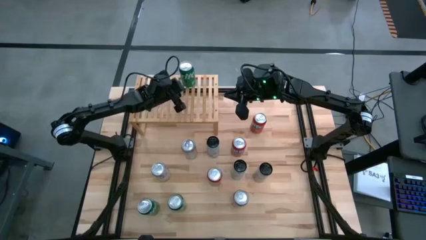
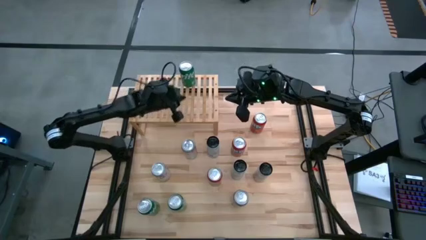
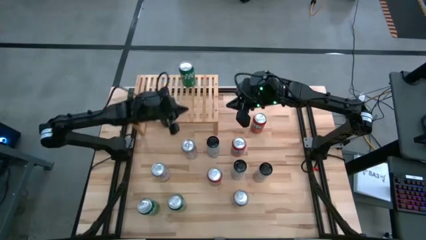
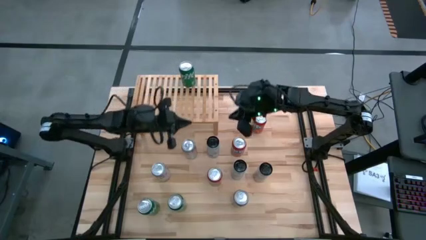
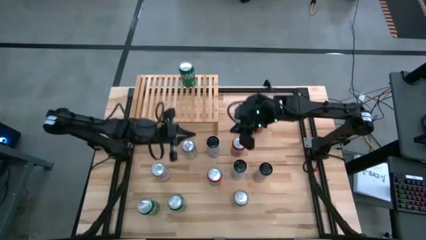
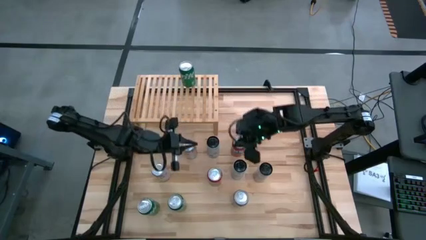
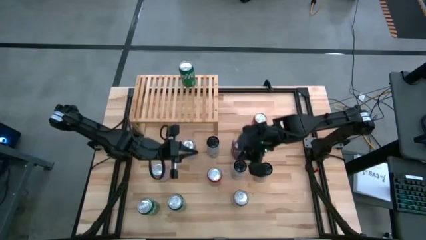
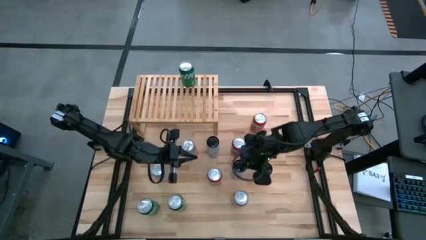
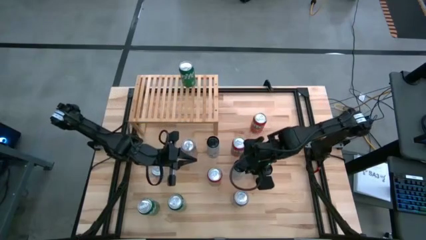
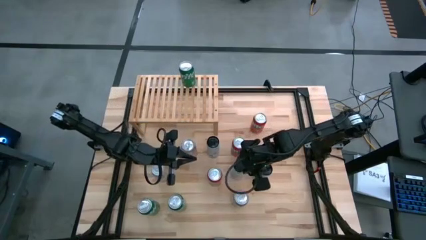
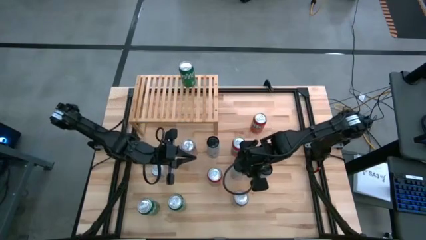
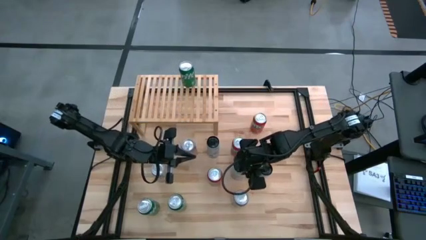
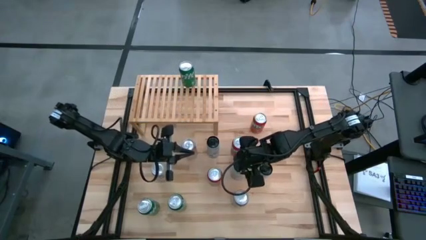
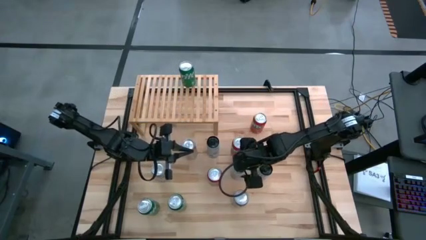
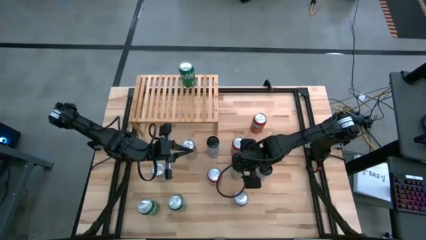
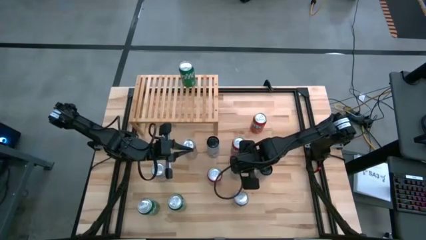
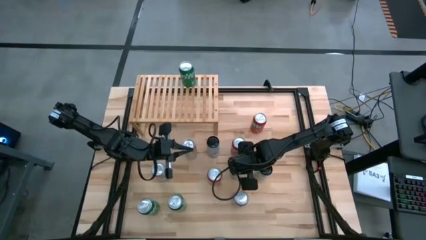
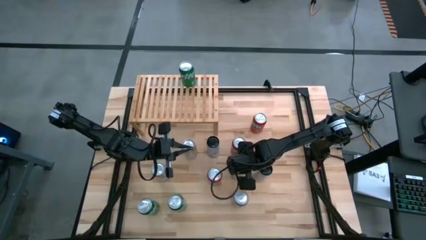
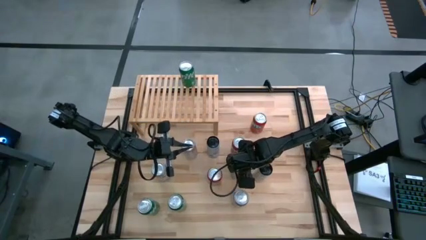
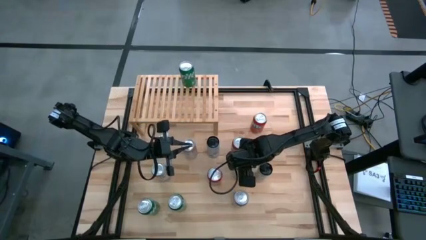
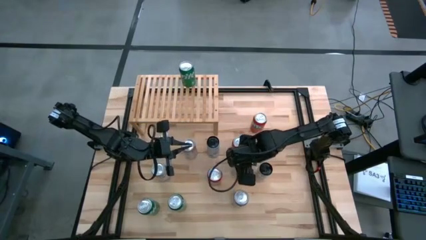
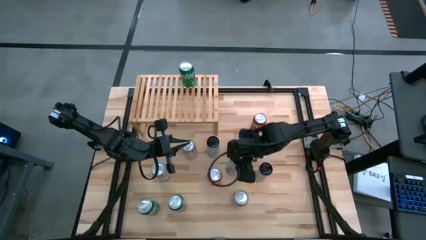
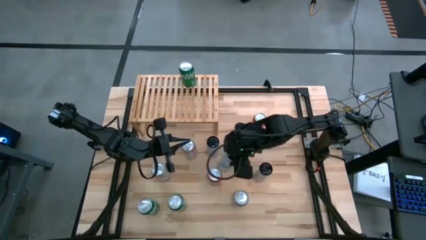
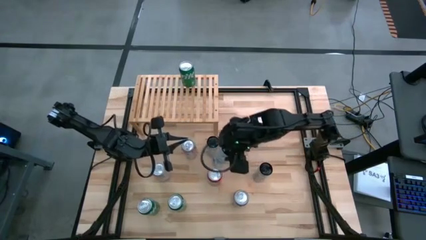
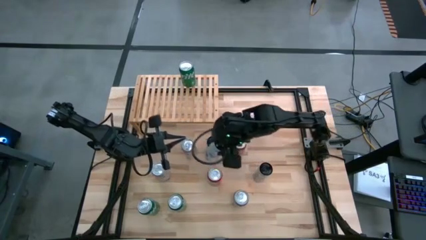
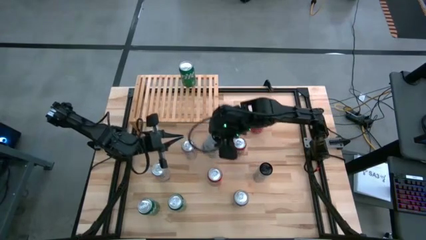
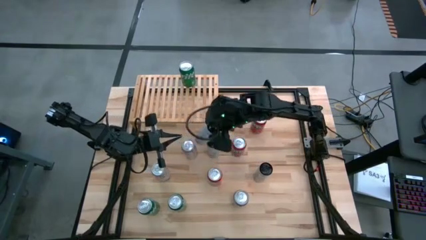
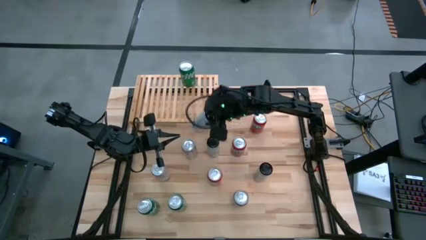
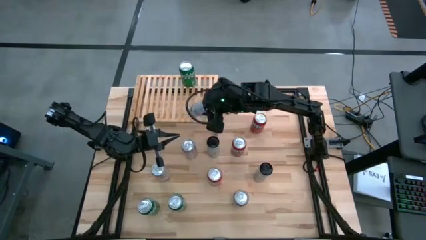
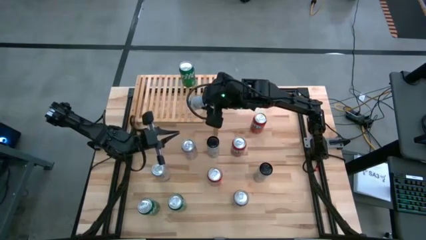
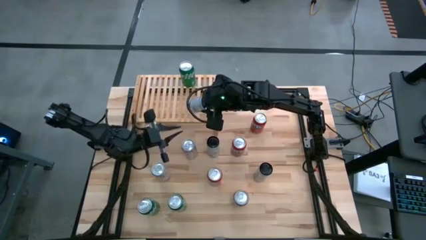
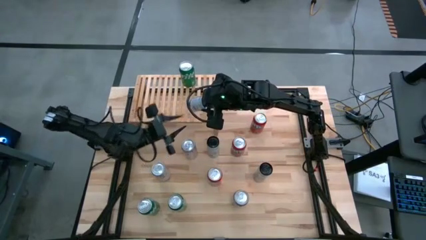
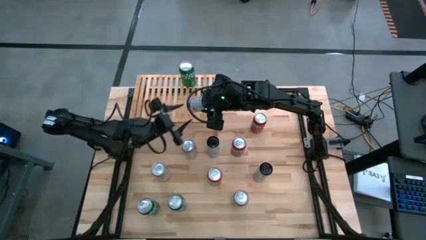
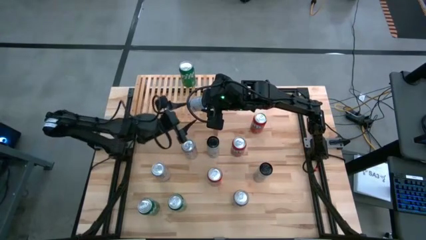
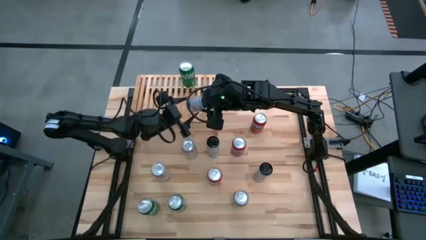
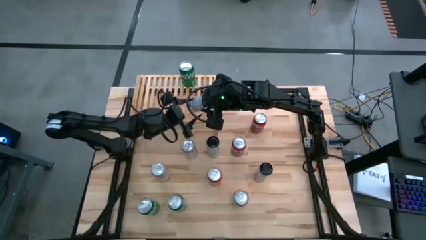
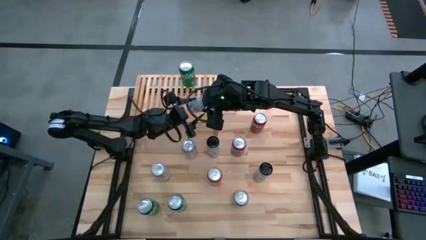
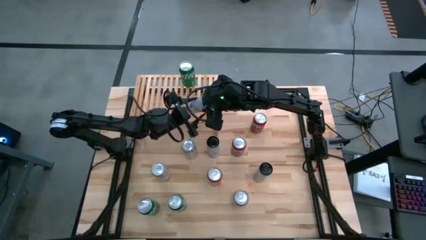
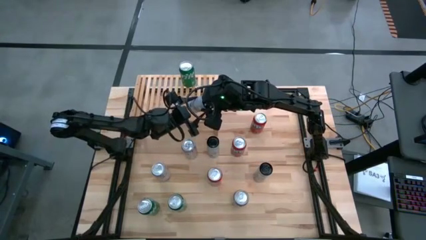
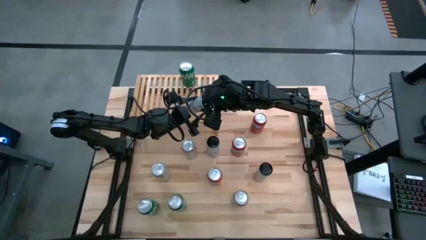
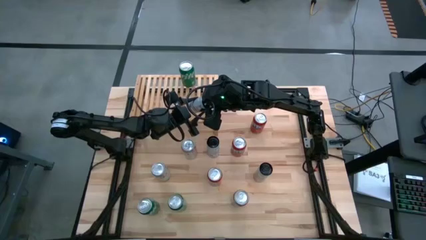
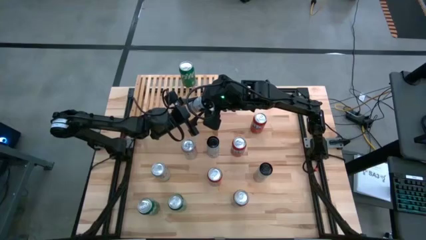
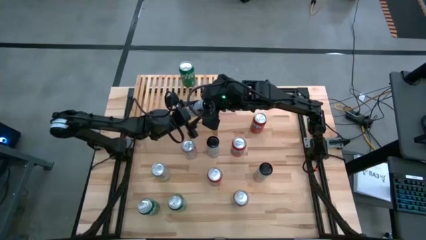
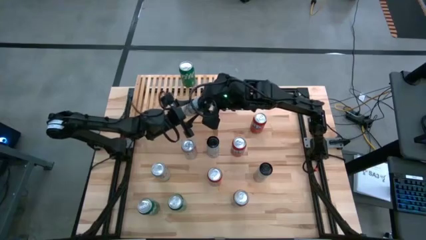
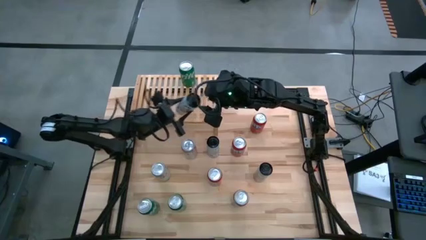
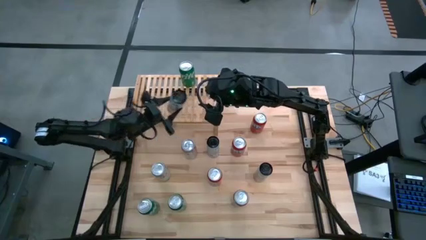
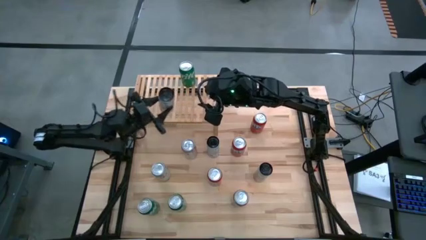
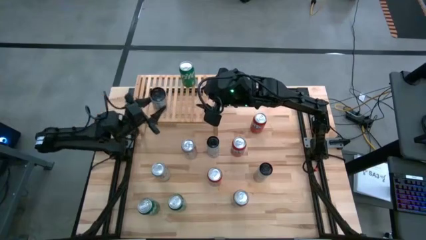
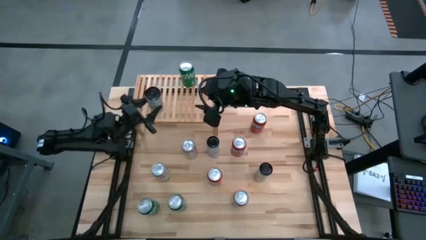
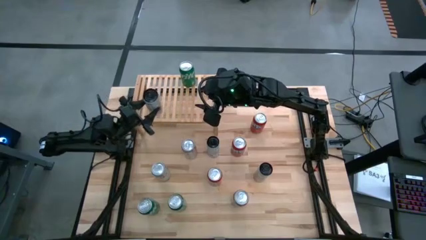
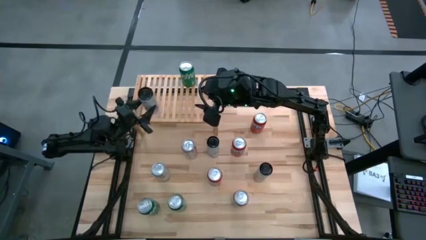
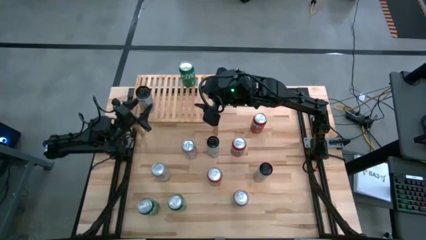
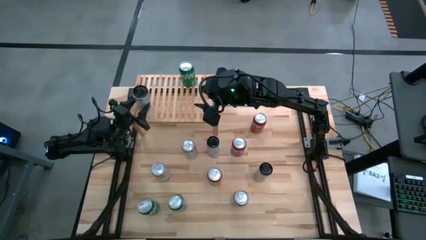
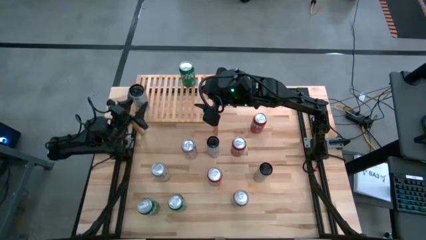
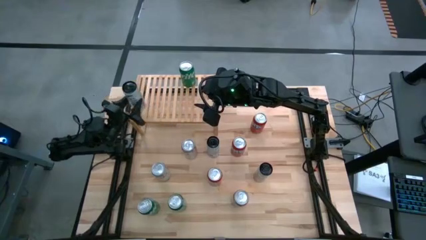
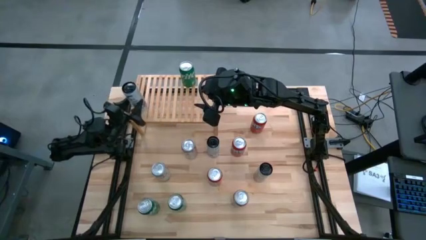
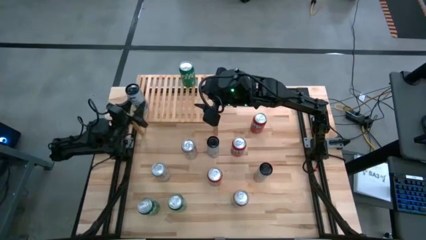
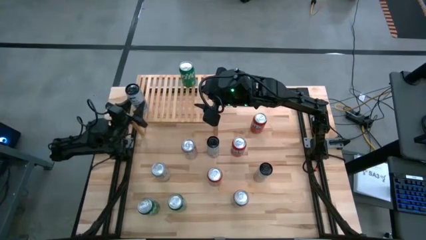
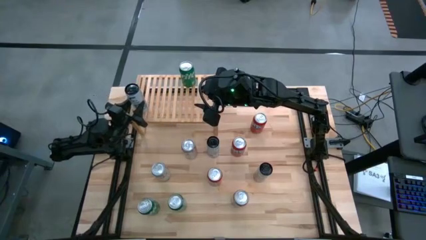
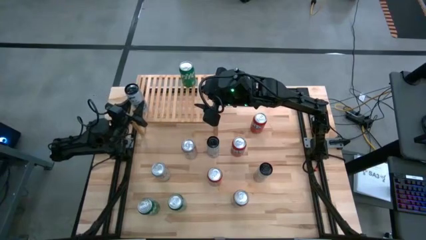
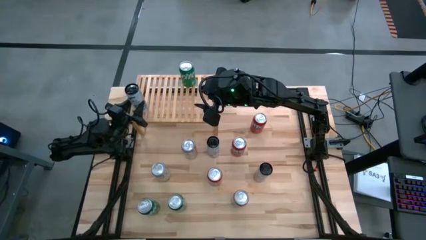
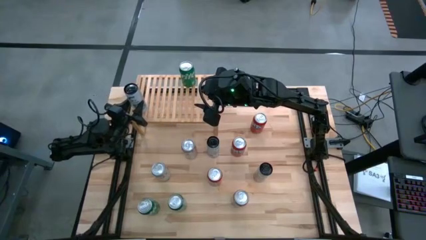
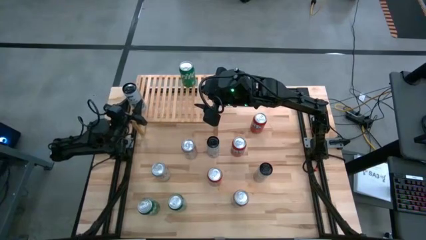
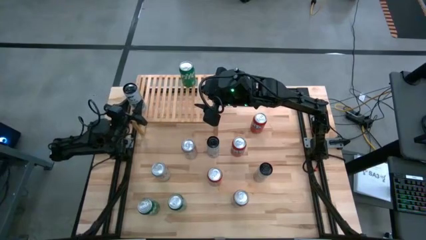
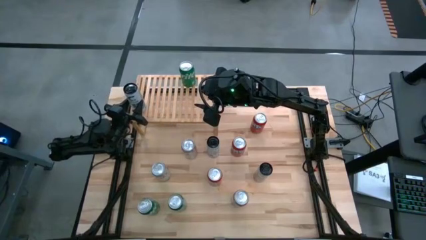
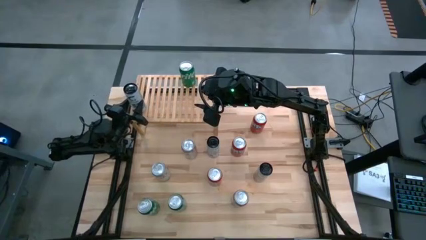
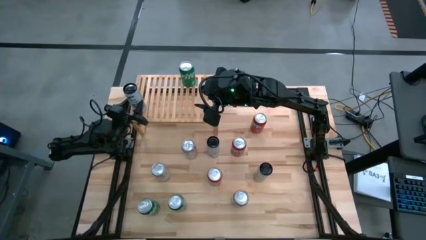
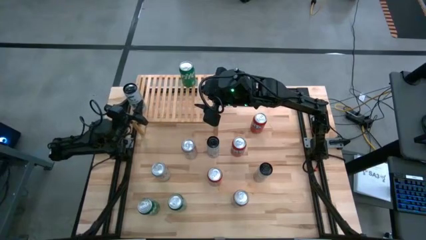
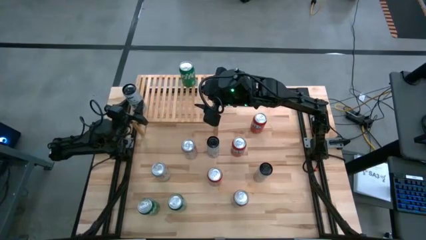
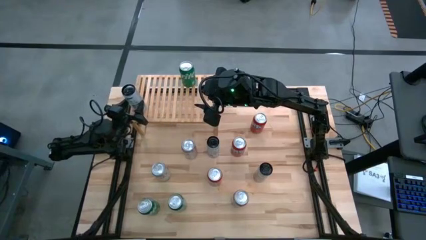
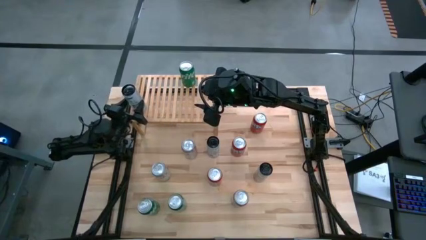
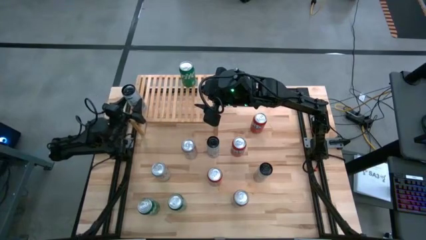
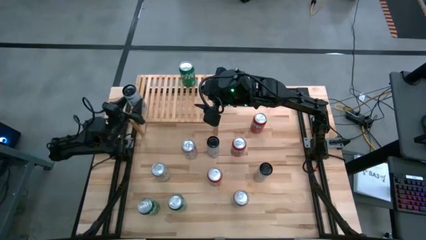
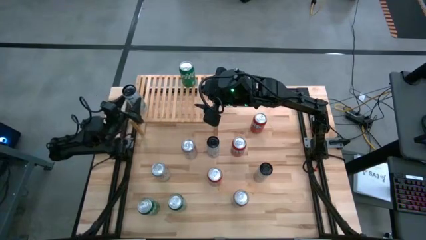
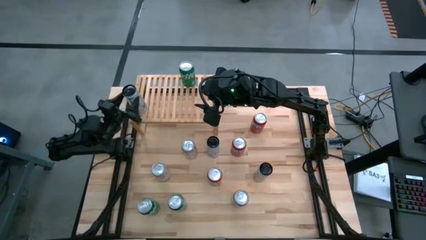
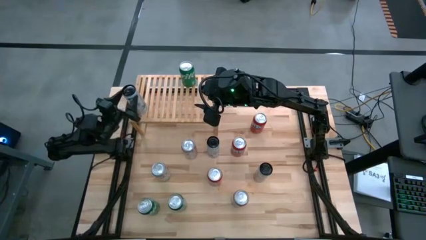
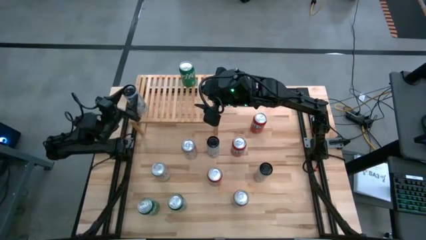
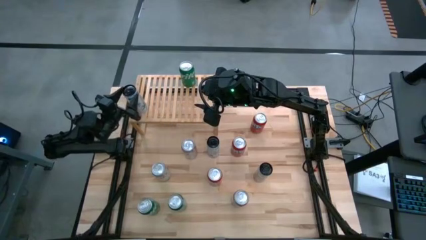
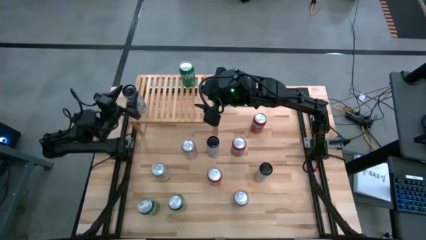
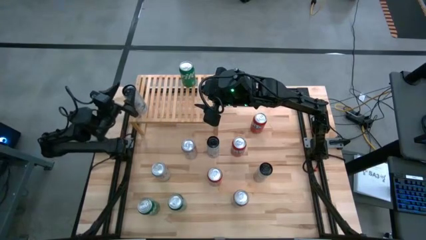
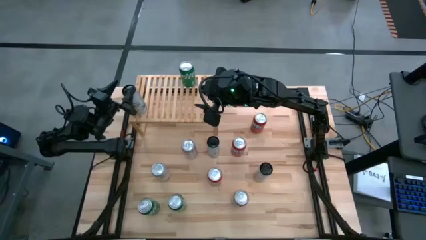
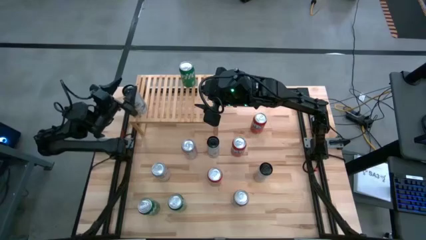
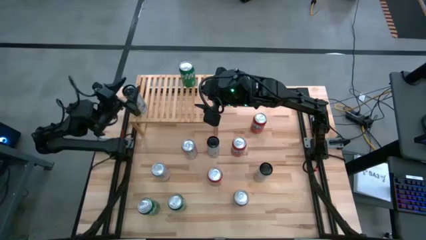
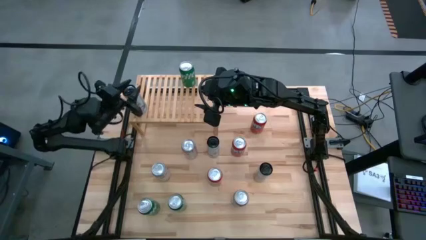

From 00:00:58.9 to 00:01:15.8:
Task: Place canned beverage on shelf
Put the bottom left white/blue soda can on the shelf
